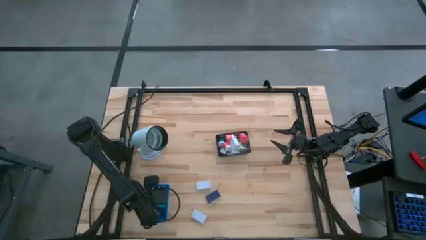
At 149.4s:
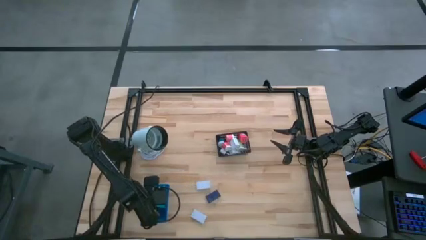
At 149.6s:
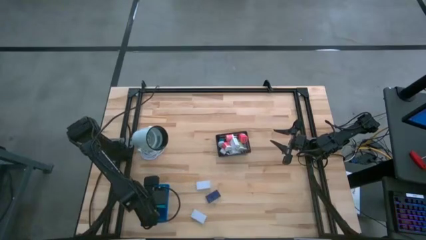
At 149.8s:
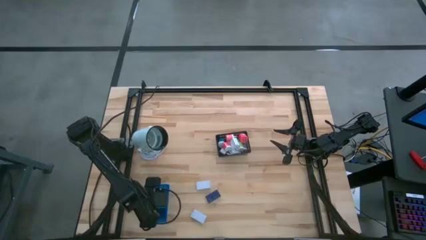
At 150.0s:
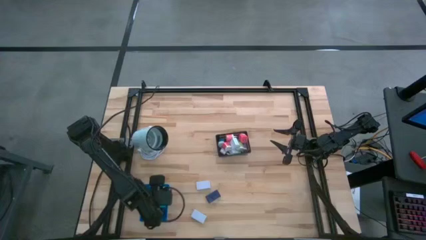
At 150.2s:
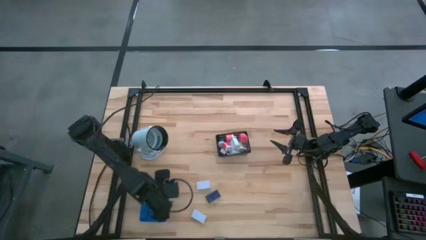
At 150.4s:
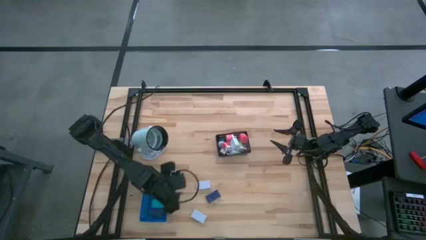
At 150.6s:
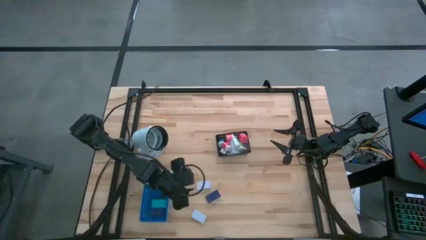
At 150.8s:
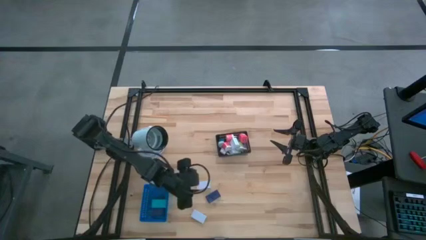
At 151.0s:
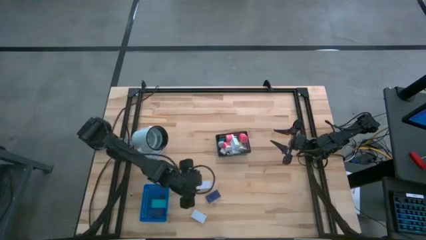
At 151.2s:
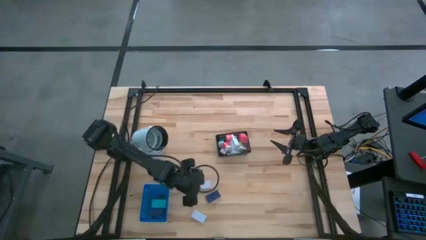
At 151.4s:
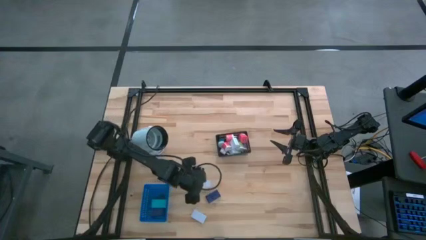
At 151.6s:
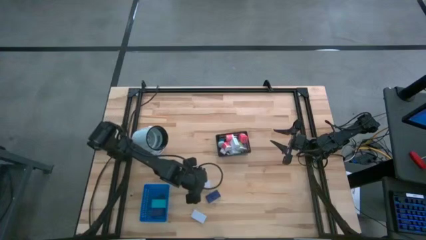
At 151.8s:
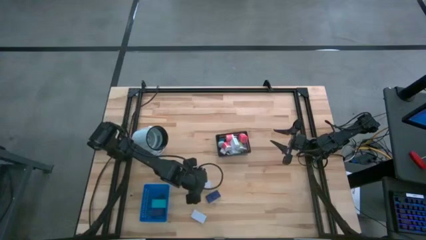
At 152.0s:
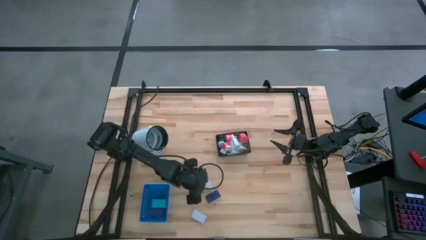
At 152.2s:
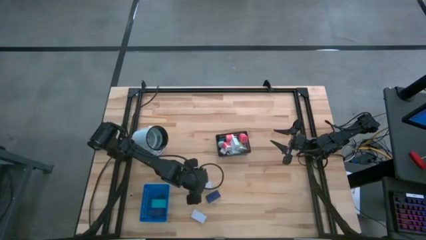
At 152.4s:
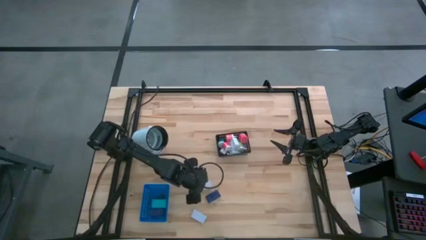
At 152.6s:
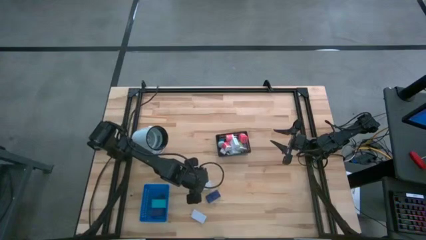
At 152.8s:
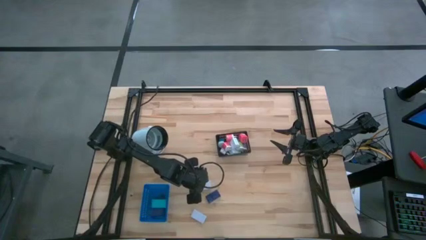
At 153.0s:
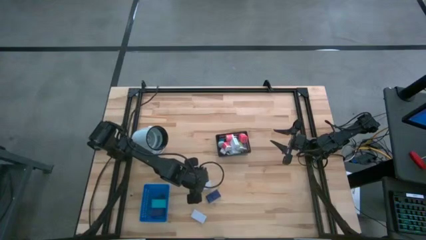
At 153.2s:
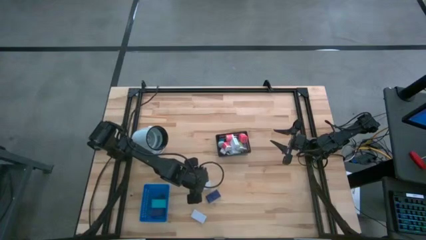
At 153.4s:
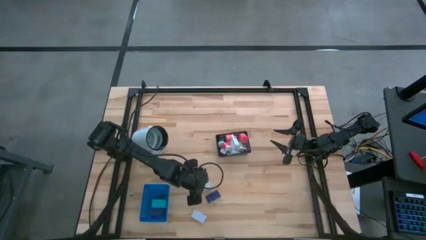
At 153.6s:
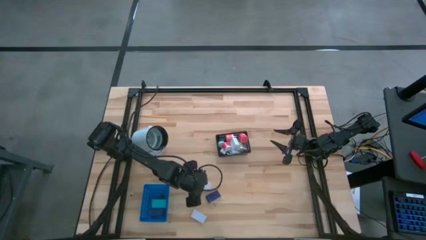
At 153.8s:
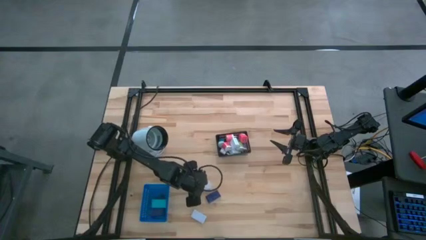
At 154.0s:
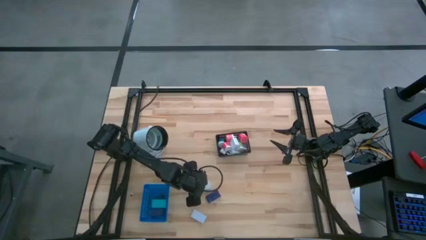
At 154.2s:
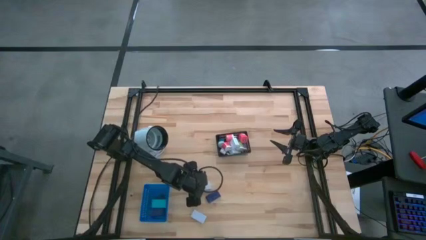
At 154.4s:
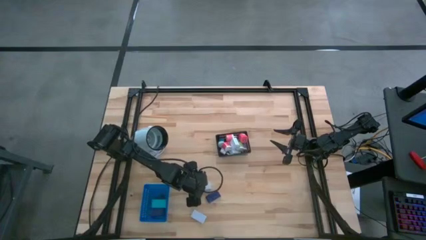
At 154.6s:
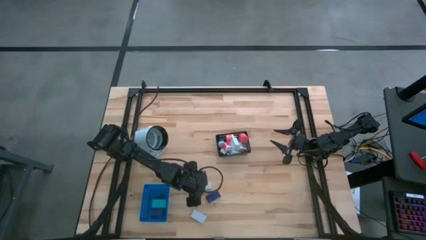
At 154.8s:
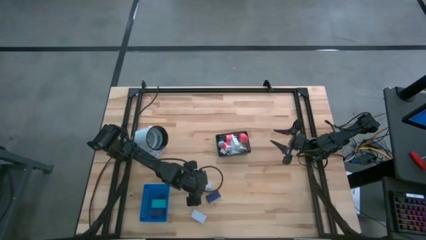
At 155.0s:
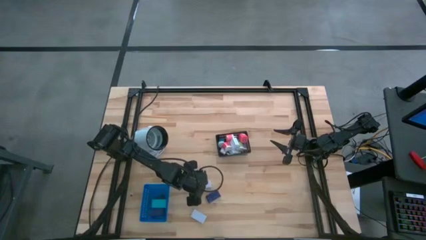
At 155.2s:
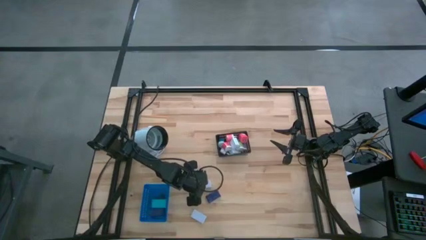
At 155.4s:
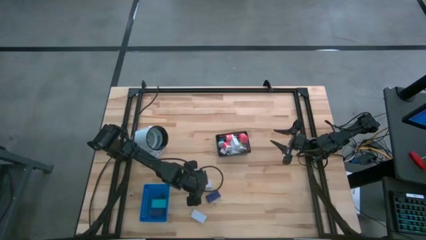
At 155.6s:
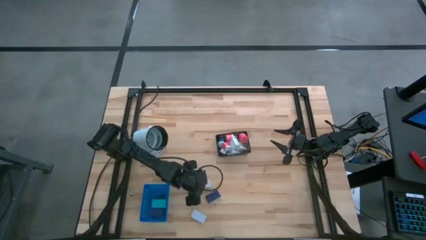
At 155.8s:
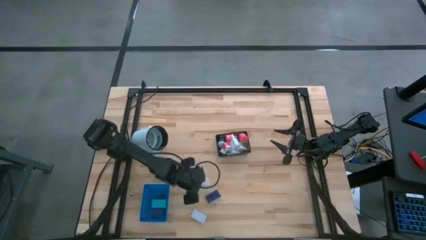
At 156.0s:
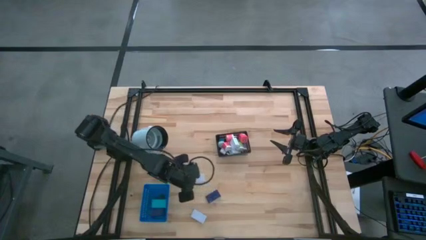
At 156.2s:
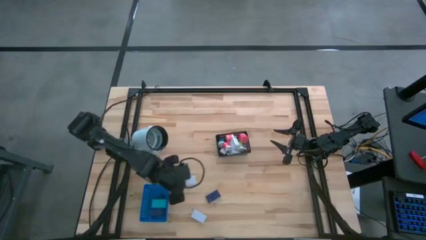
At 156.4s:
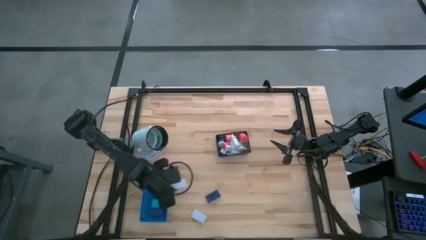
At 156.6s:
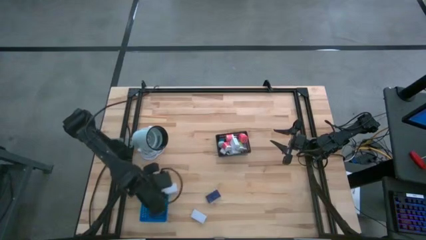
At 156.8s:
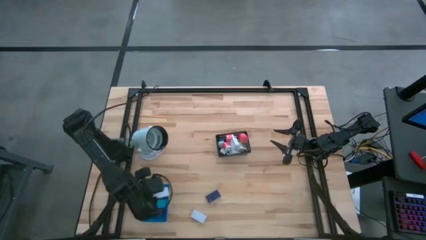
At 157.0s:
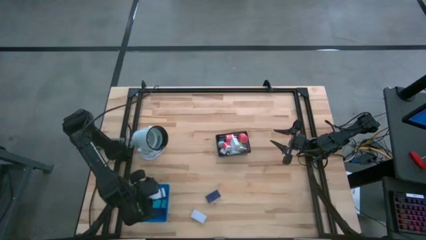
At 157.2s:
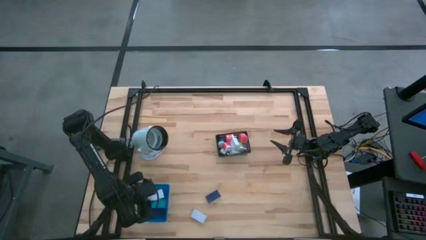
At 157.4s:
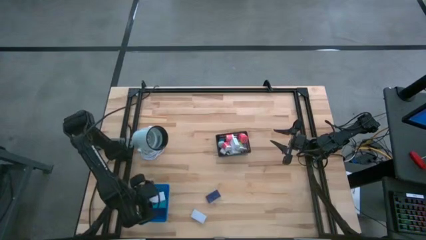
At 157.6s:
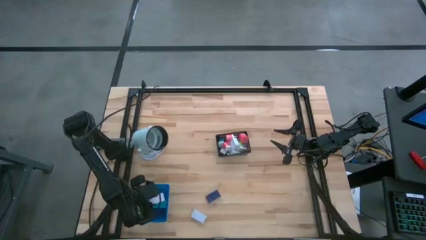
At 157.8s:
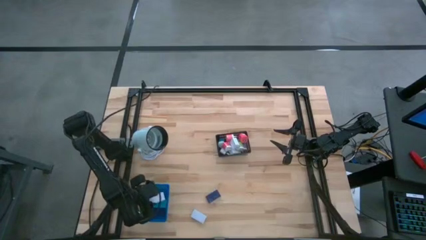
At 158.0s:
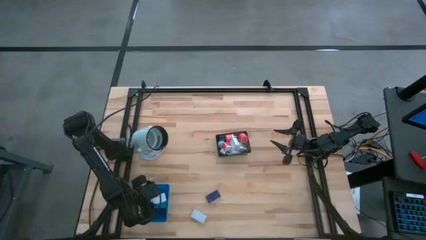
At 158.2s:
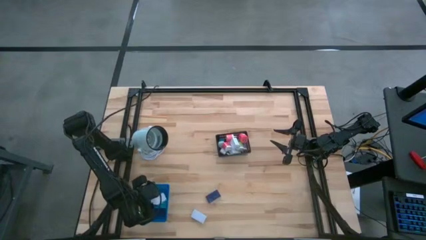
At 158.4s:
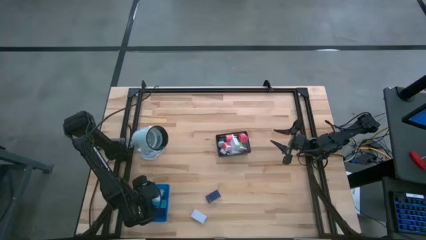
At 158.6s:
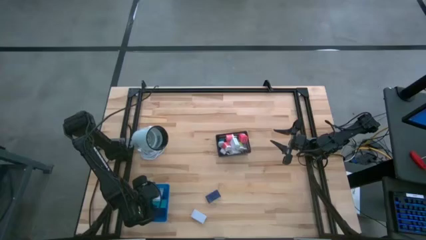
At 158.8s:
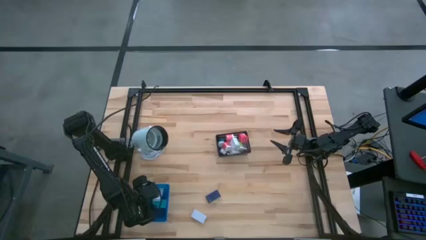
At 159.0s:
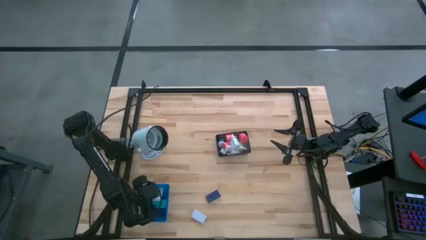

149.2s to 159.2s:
Task: Pick & Place Office items
Put the top white digital timer into the blue bin

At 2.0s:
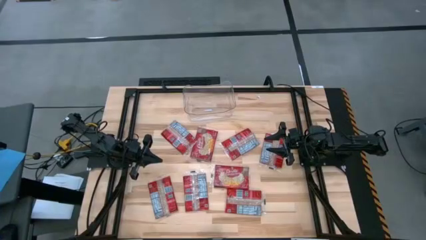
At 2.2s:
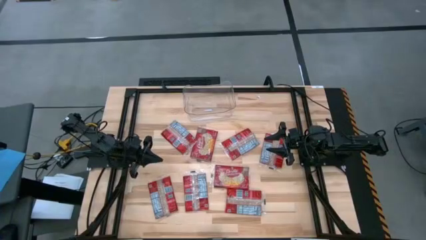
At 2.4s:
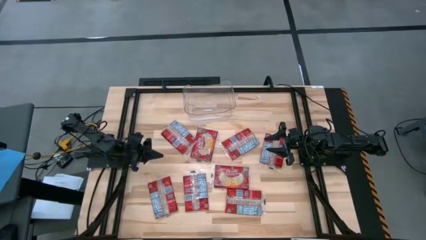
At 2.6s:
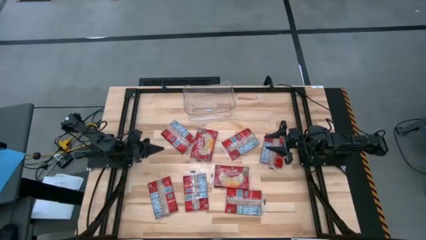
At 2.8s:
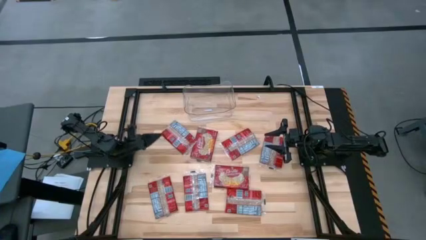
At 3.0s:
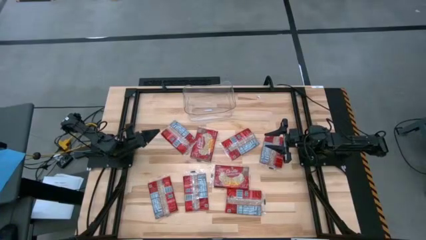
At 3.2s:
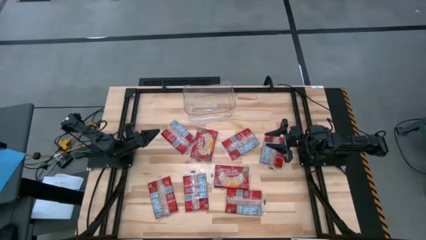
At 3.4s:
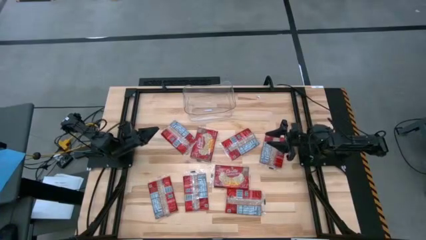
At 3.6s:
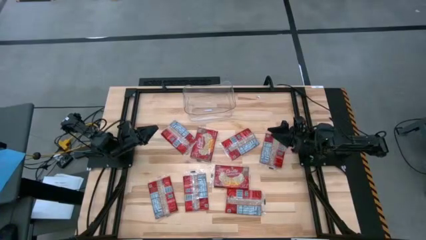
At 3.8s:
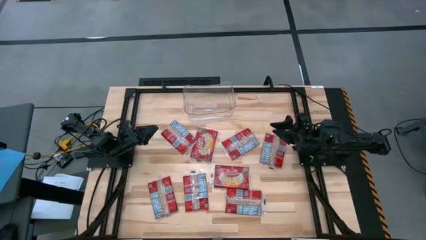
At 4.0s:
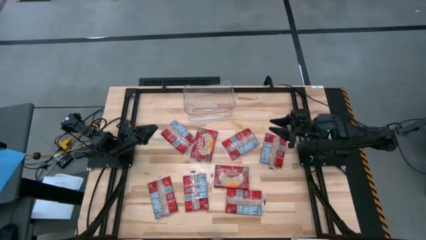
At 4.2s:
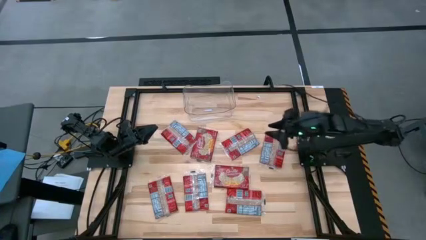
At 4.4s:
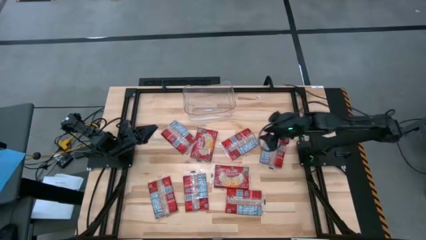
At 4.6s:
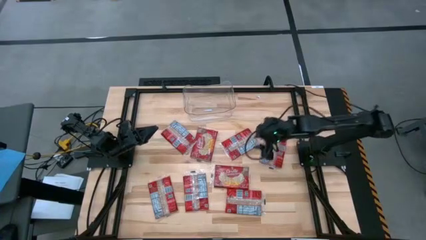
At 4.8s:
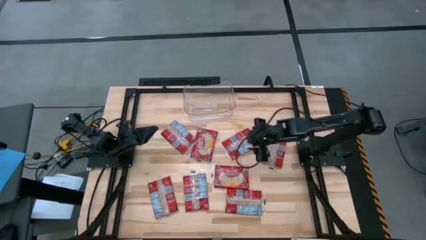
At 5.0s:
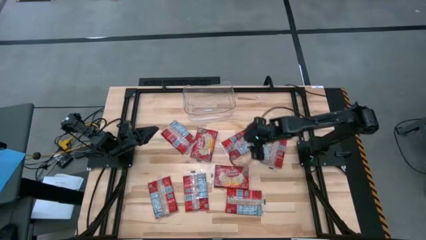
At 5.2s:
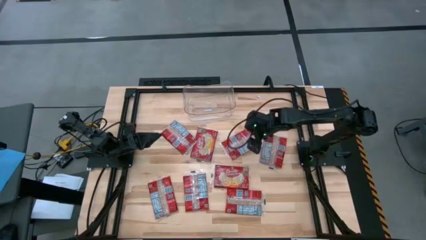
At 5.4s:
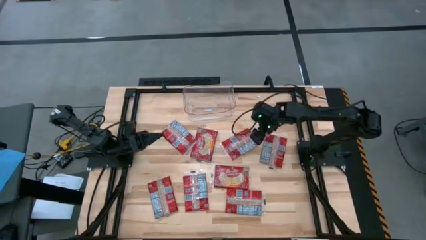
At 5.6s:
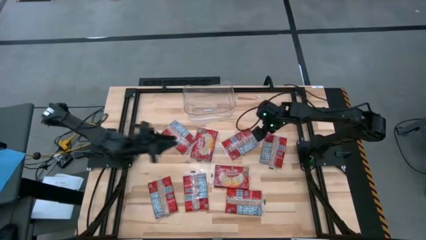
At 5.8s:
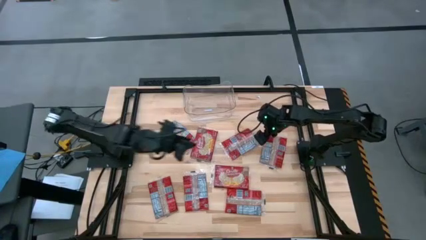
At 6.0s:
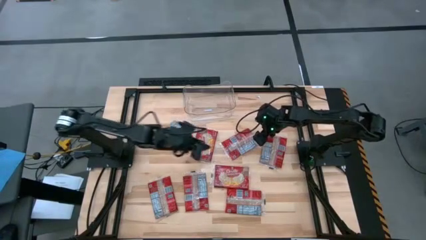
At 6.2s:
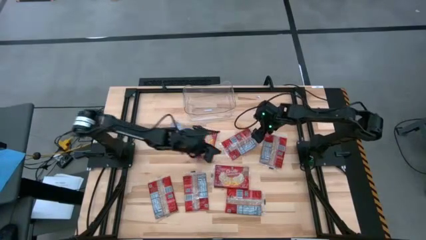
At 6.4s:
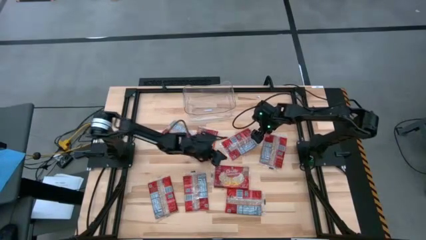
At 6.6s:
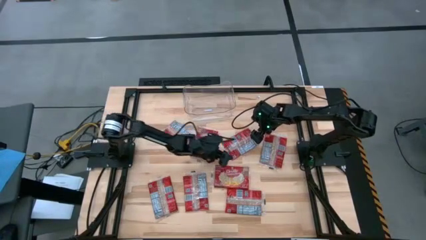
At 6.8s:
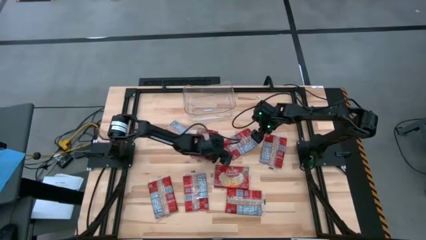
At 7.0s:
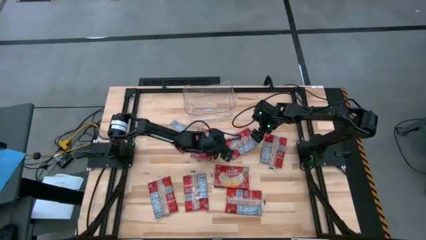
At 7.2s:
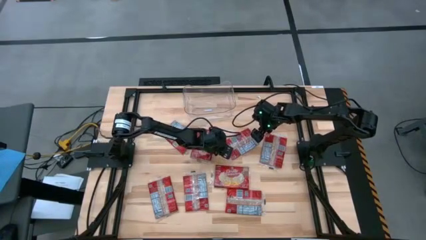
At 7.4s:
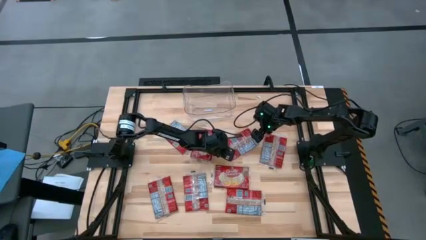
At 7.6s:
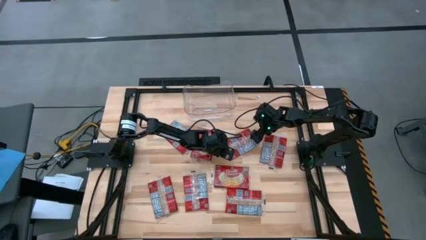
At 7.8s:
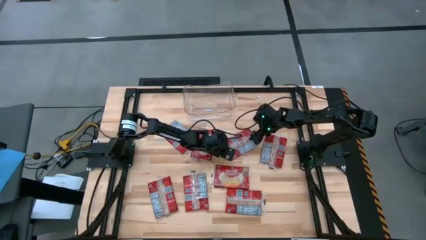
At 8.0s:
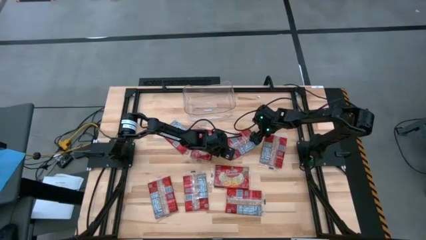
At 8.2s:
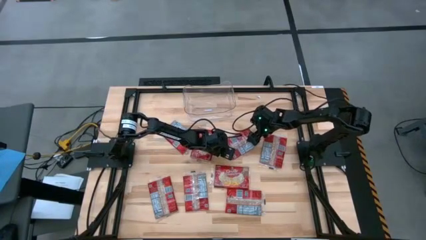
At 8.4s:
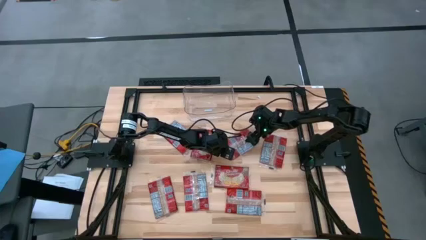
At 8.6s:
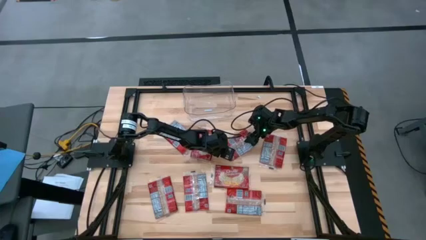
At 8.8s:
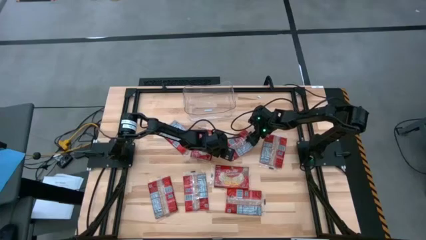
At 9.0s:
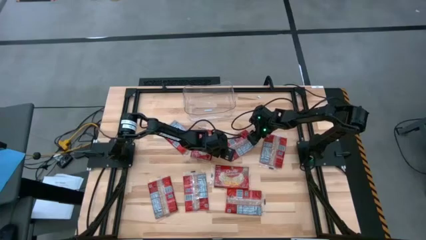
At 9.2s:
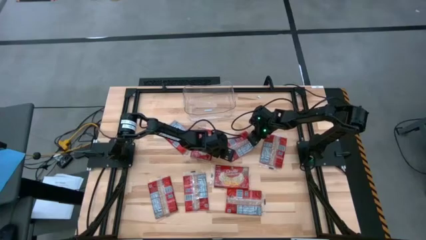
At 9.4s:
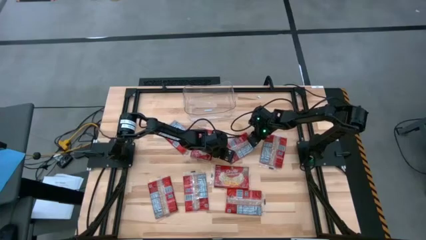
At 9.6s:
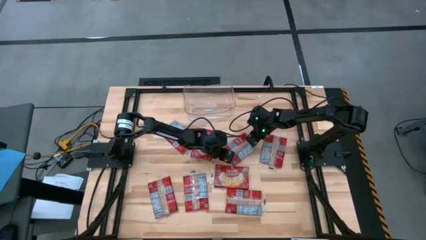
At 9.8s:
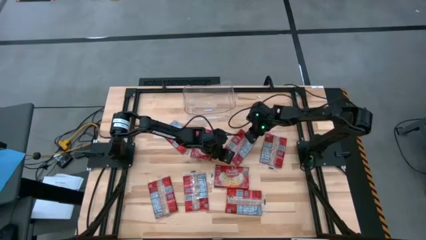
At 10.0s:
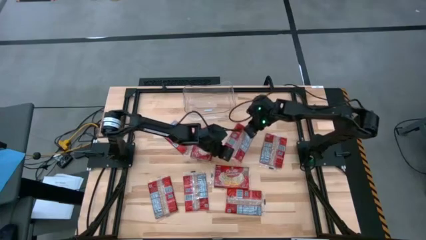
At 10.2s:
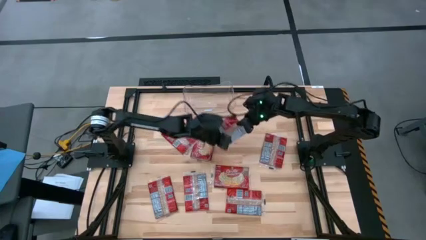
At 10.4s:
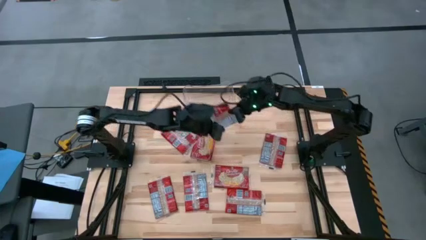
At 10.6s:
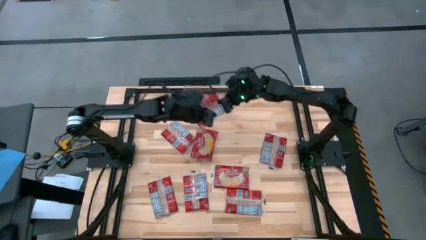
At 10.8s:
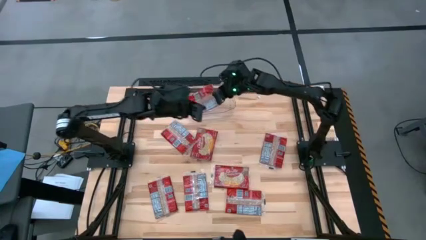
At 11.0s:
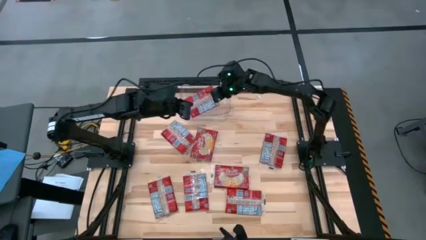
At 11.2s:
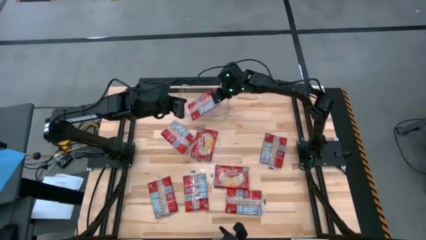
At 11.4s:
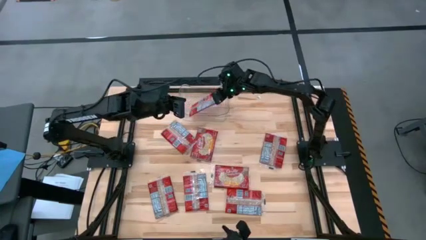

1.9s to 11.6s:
Task: Sort popcorn bags into baskets
Put the red popcorn pack into the transparent bin
